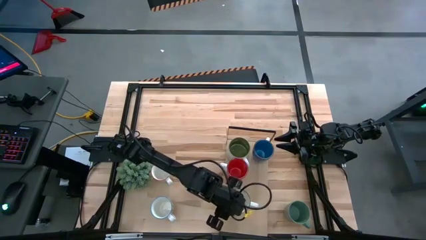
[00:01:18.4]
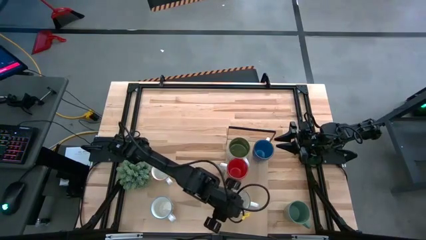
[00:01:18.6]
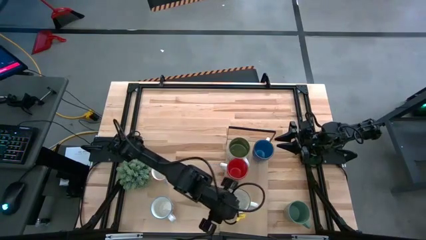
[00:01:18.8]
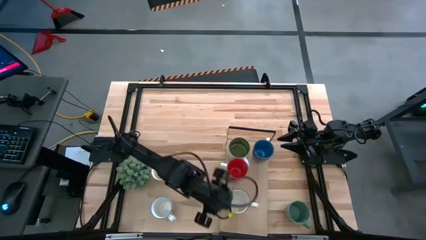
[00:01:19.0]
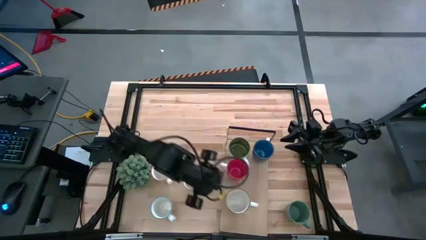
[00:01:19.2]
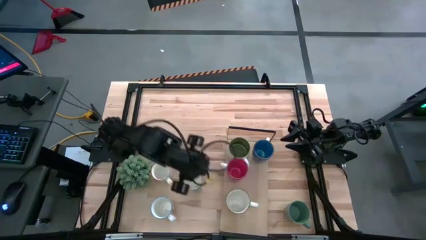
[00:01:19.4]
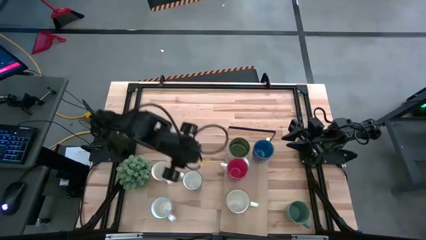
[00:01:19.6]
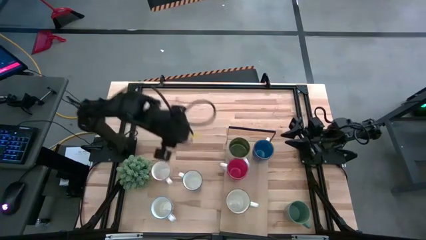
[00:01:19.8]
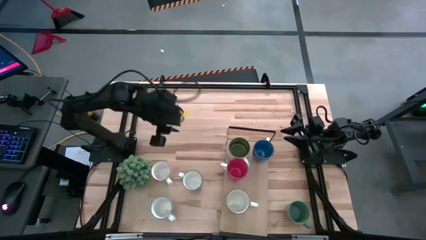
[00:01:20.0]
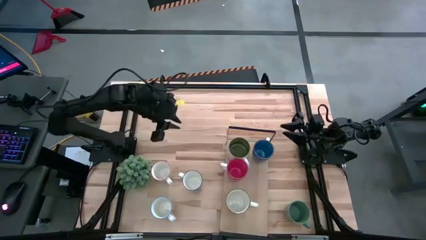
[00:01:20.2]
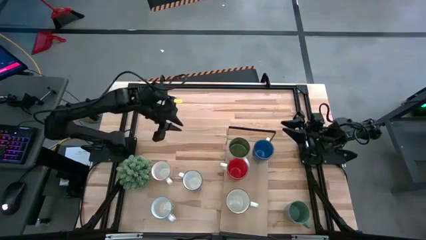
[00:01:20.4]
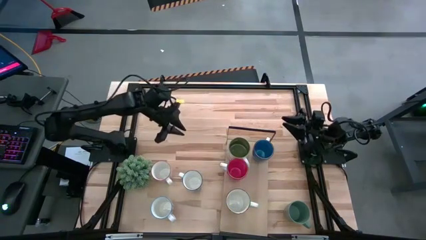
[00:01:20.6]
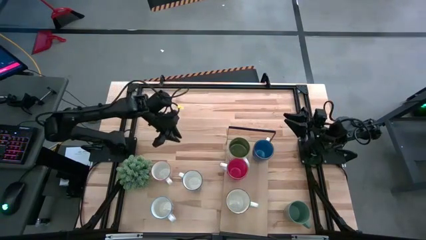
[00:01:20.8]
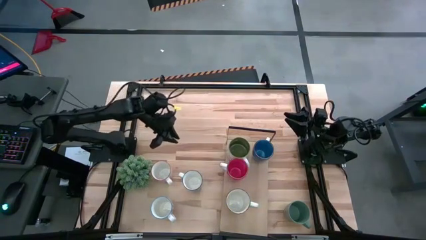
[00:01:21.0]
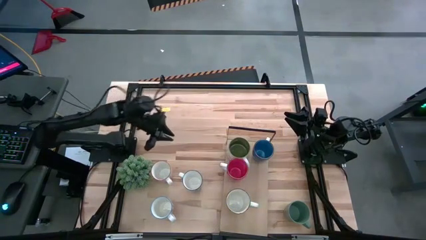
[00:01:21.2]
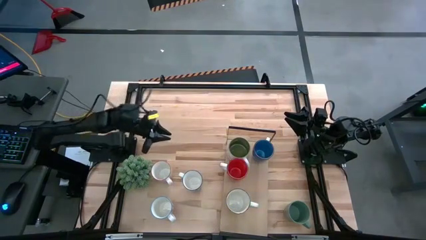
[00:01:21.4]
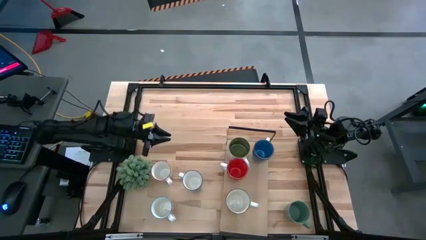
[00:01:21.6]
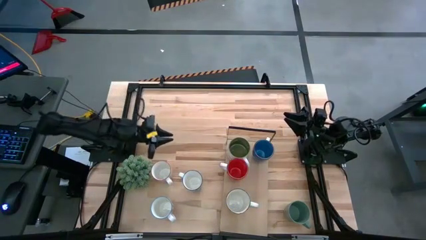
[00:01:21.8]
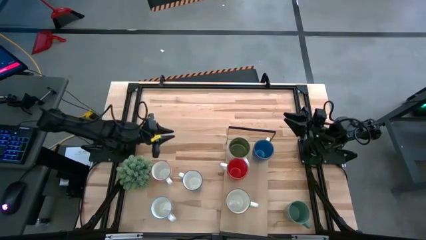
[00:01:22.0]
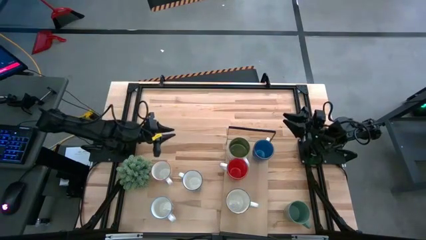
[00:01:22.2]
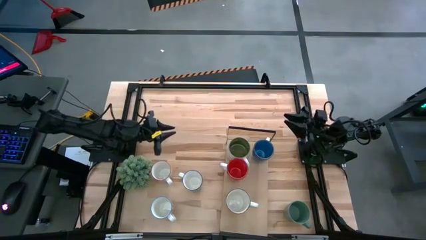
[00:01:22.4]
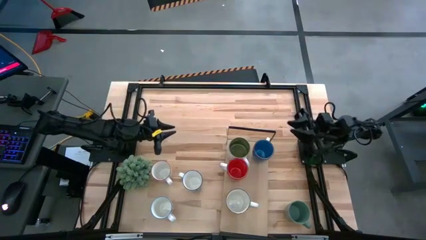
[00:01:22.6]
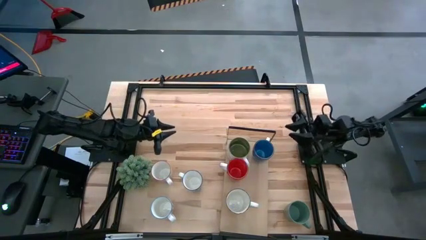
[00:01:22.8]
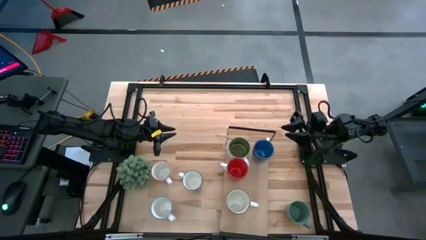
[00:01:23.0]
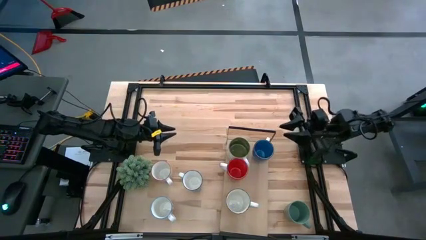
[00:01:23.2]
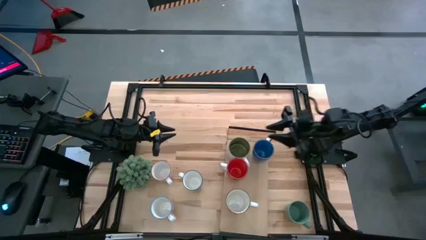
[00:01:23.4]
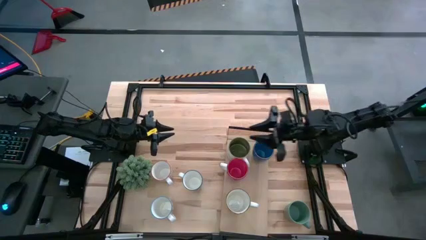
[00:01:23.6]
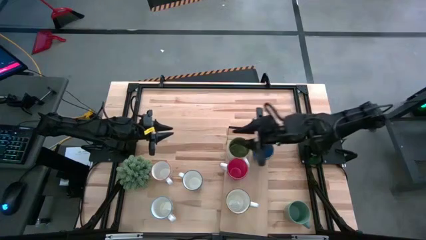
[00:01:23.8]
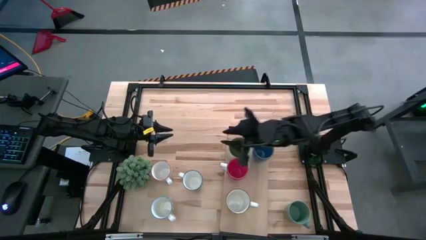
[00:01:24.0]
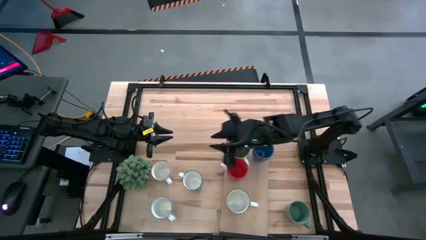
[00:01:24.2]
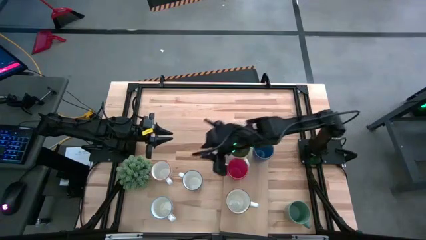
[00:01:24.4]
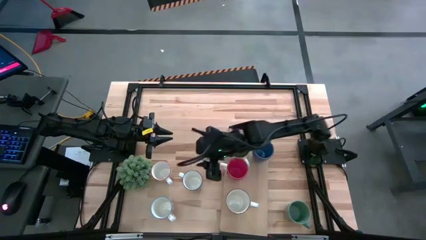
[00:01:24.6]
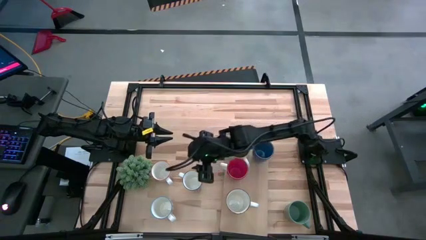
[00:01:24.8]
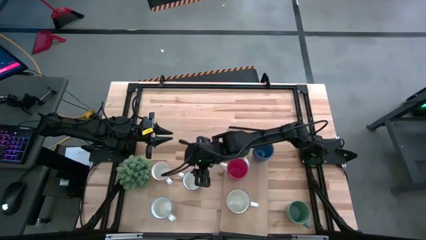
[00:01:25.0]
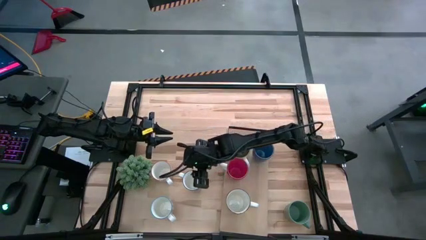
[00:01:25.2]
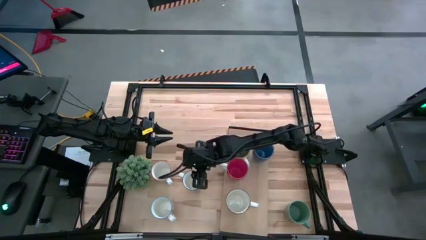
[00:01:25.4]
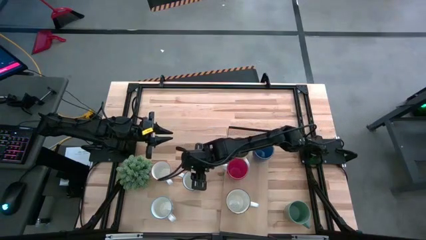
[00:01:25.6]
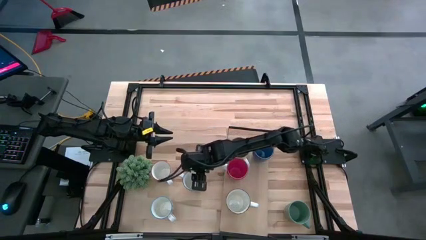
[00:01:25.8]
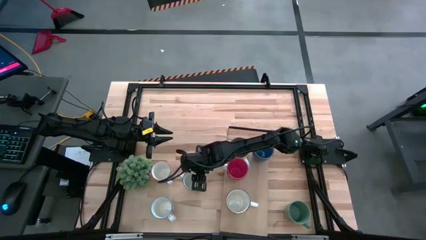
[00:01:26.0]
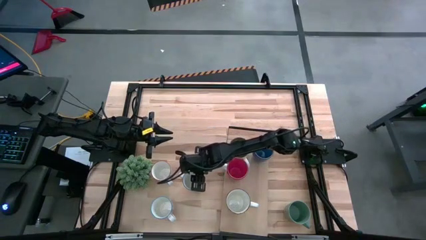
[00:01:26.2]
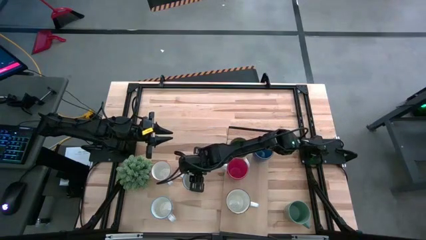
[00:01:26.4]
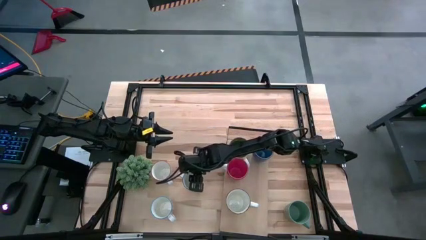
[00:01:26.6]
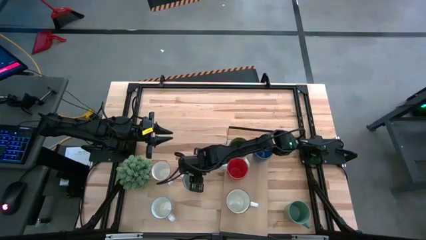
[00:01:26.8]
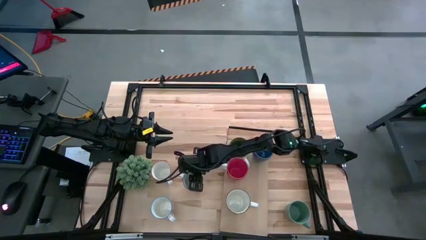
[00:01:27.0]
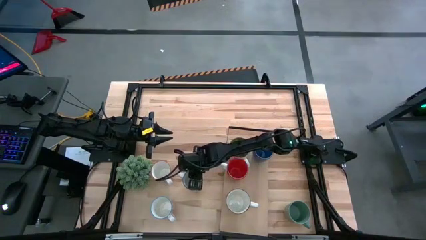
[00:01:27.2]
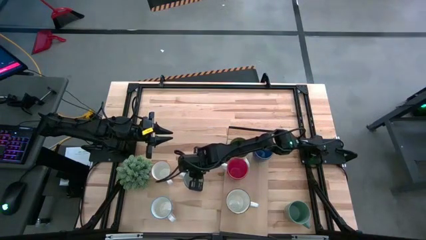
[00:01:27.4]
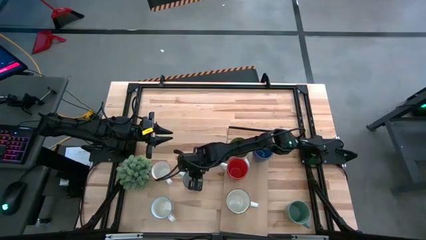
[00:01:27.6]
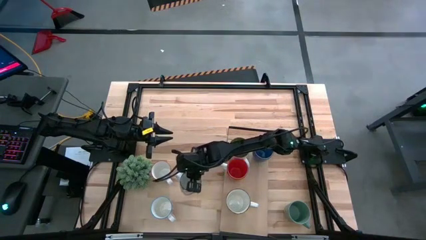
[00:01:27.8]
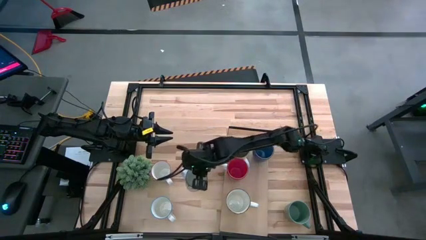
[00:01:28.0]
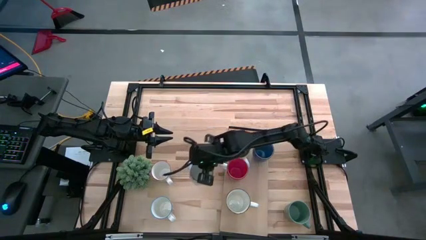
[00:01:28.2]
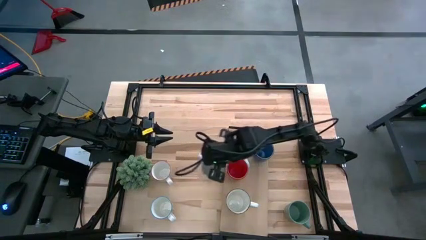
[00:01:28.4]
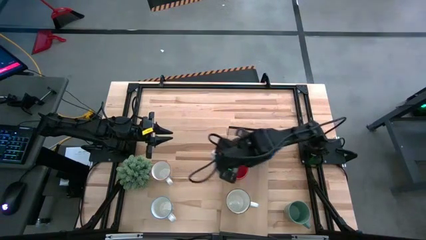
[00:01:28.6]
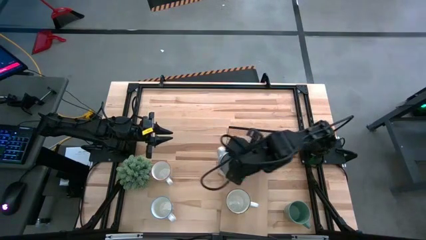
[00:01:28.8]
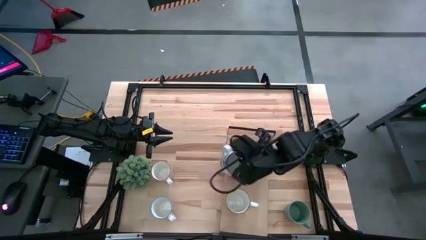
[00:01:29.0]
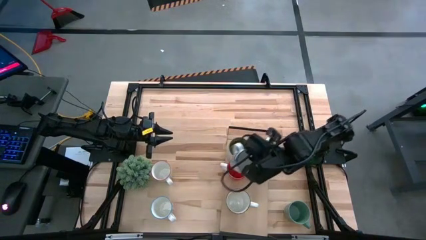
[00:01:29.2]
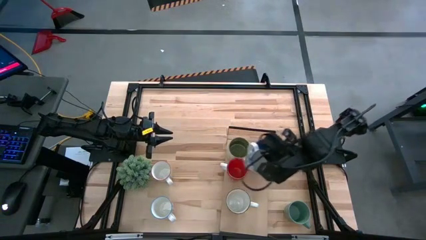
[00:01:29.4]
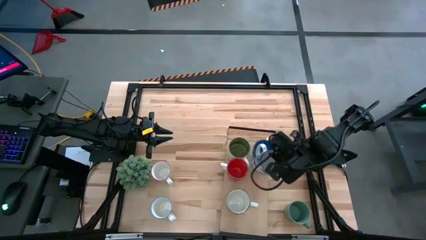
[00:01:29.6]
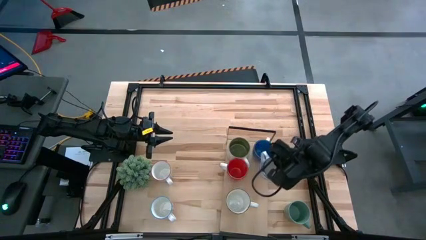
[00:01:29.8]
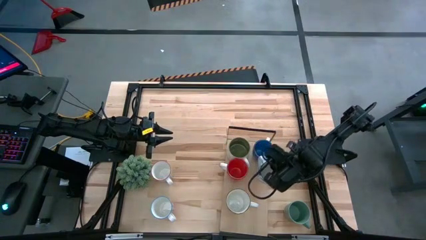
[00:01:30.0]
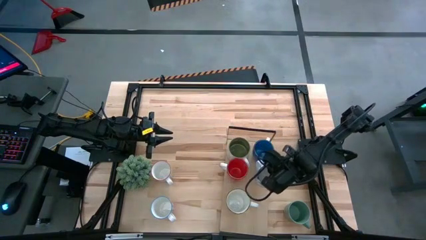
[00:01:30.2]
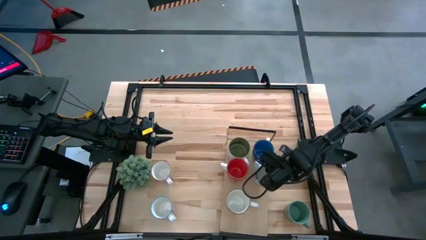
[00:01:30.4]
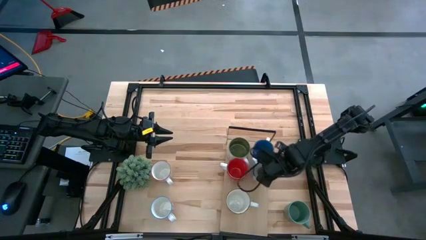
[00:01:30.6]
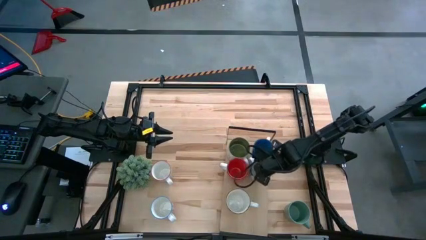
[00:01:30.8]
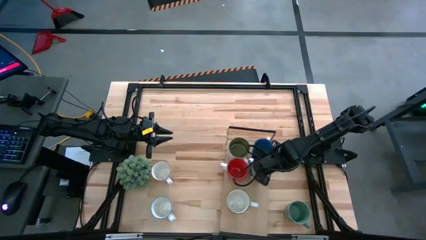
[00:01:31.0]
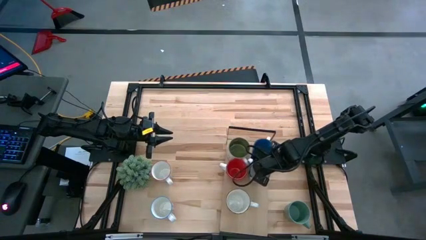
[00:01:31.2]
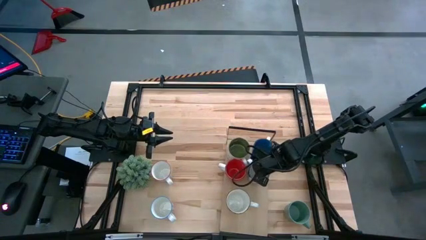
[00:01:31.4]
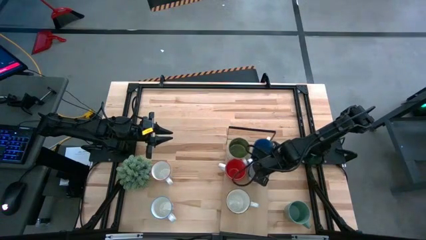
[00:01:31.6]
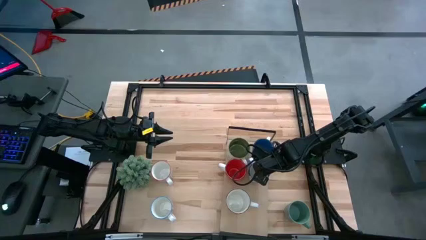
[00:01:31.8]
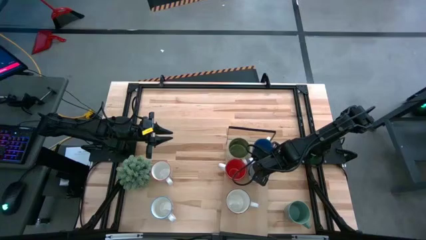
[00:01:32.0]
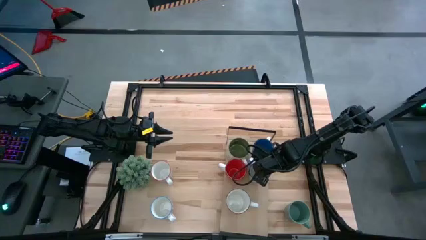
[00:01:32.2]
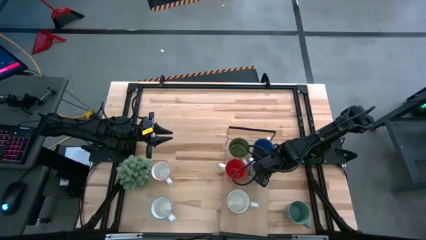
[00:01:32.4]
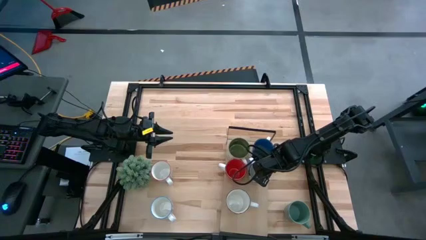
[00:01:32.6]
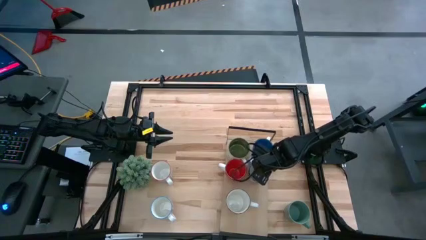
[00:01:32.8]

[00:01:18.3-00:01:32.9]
Task: Place coffee mugs
Put the blue and white mug on the shelf
